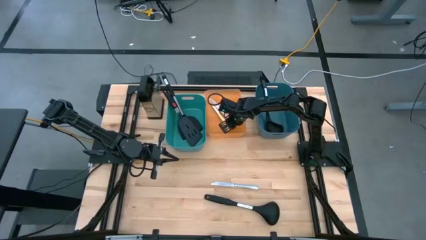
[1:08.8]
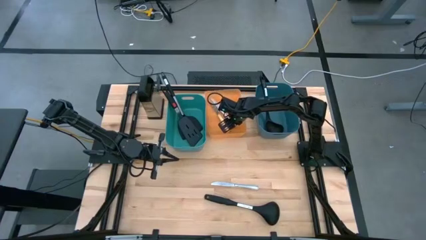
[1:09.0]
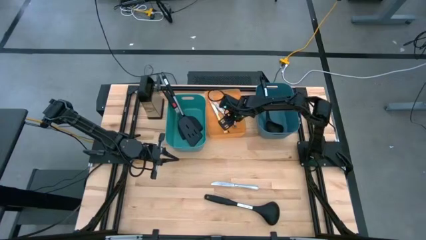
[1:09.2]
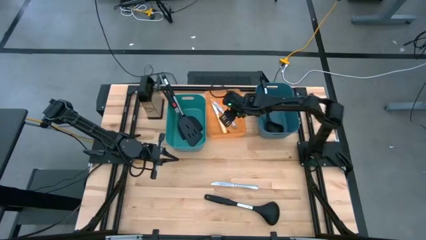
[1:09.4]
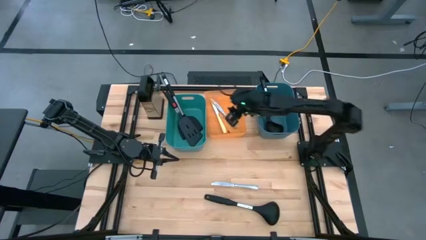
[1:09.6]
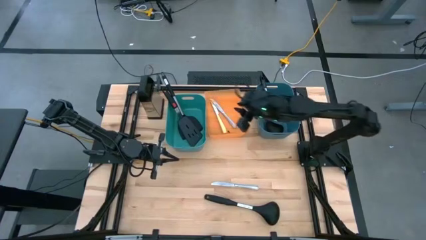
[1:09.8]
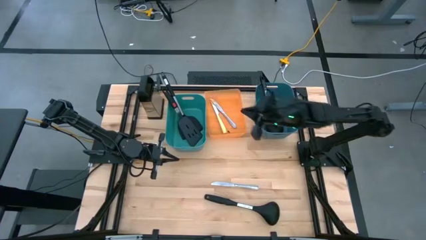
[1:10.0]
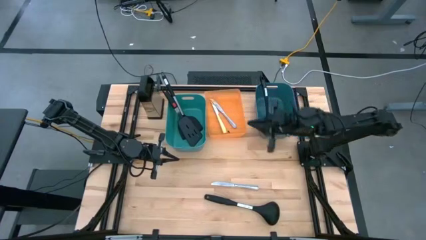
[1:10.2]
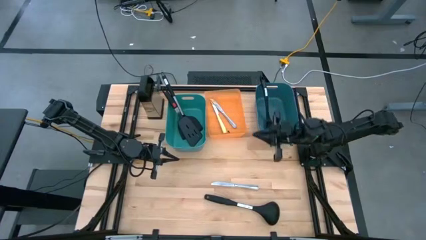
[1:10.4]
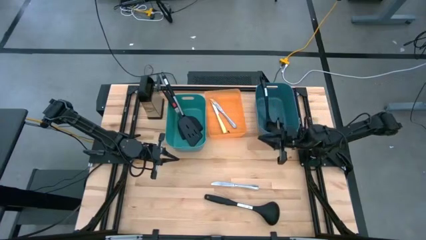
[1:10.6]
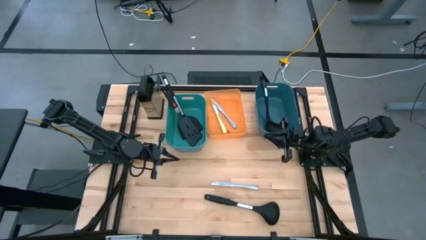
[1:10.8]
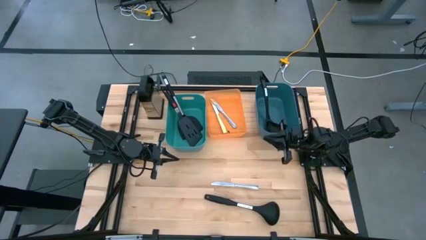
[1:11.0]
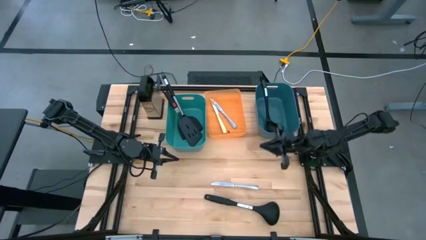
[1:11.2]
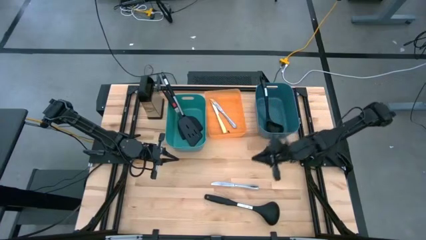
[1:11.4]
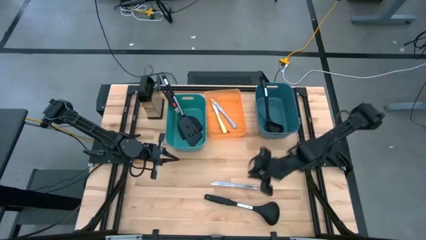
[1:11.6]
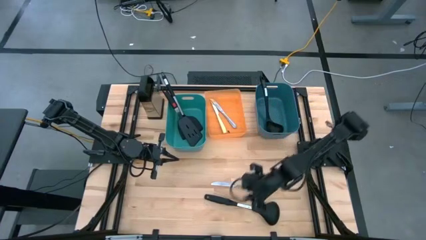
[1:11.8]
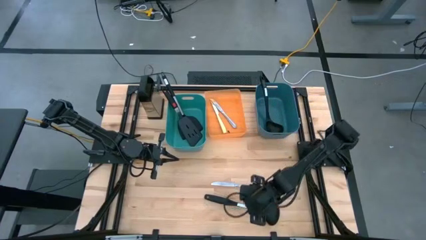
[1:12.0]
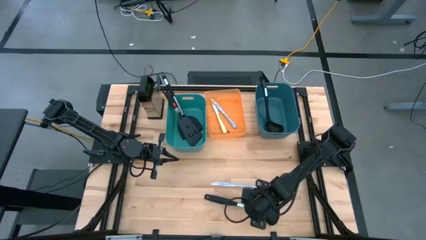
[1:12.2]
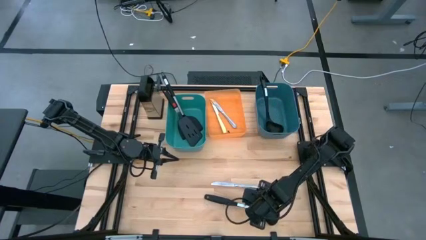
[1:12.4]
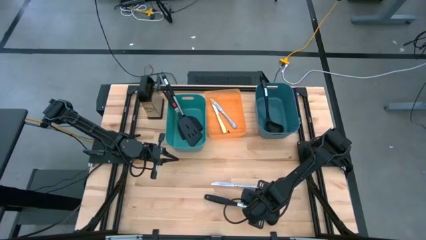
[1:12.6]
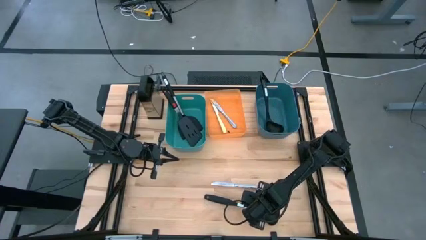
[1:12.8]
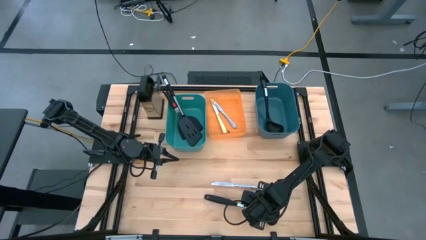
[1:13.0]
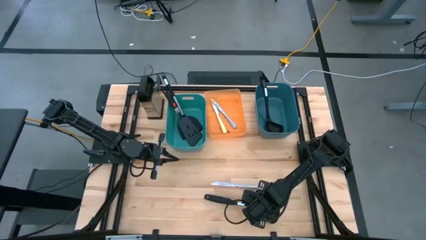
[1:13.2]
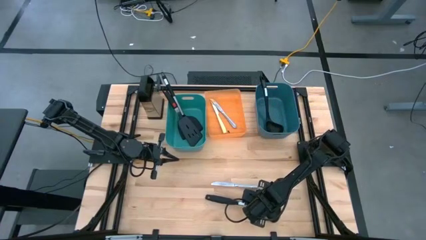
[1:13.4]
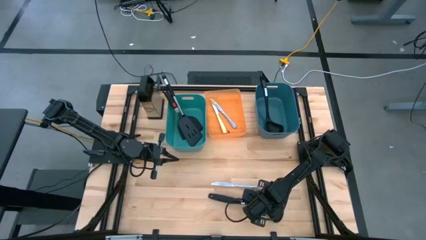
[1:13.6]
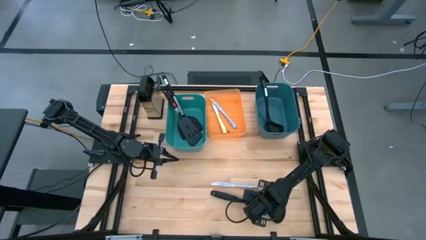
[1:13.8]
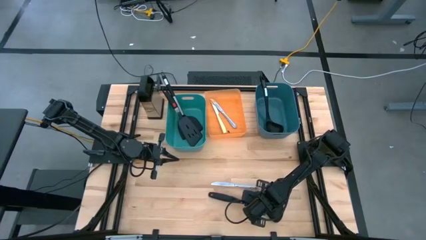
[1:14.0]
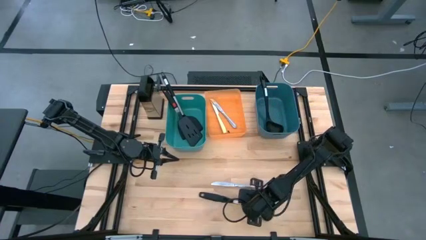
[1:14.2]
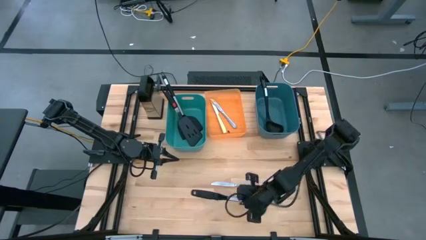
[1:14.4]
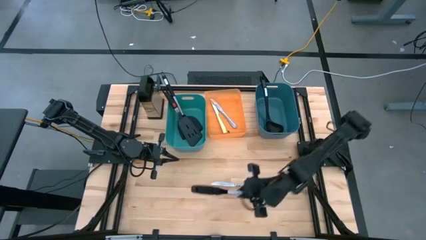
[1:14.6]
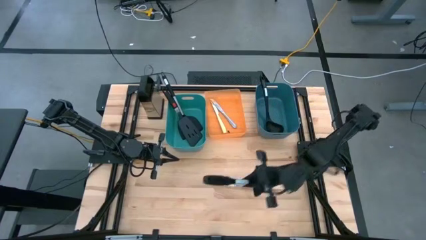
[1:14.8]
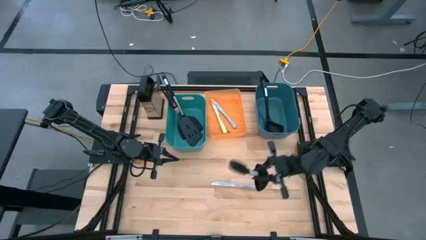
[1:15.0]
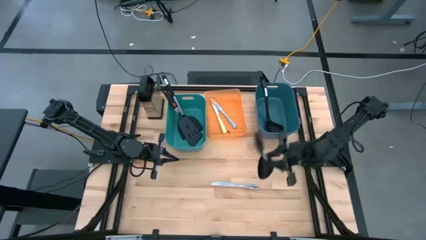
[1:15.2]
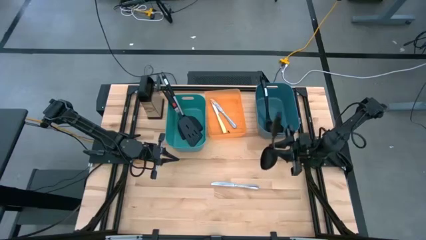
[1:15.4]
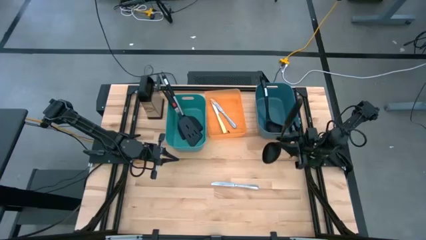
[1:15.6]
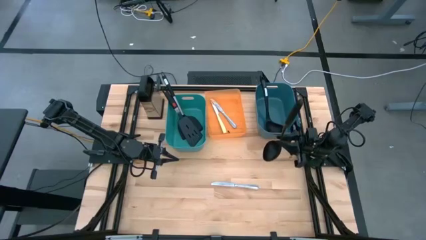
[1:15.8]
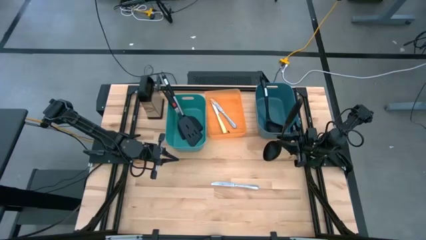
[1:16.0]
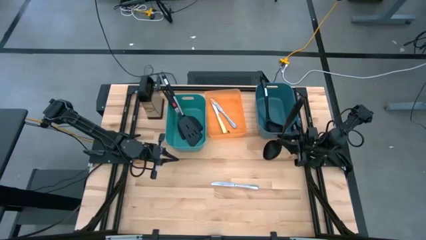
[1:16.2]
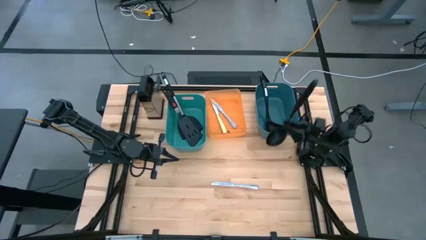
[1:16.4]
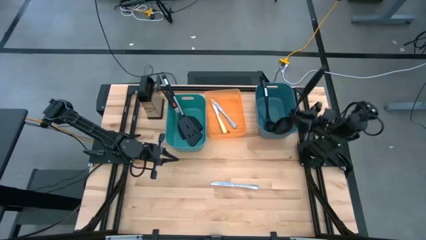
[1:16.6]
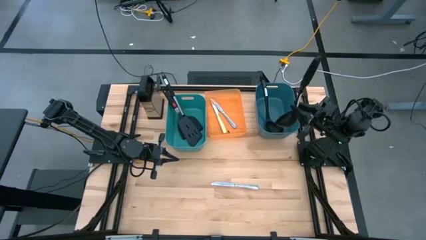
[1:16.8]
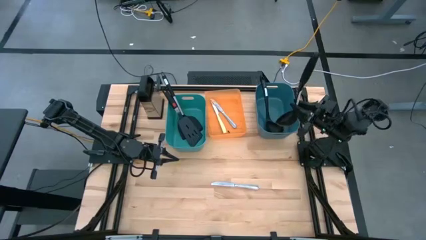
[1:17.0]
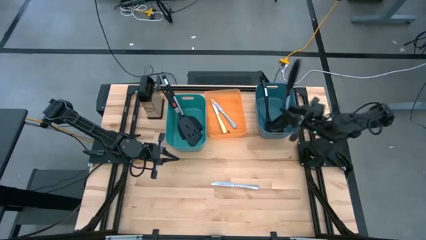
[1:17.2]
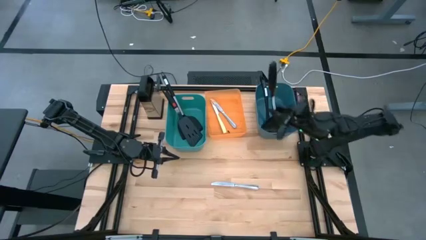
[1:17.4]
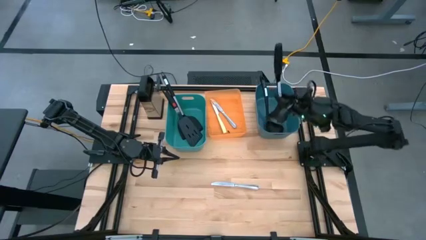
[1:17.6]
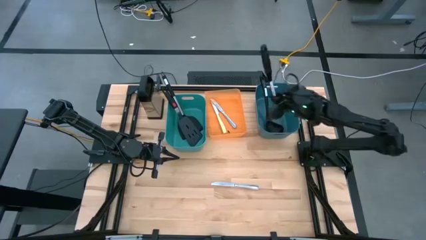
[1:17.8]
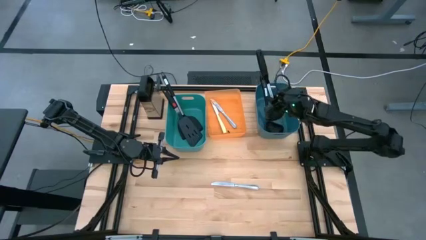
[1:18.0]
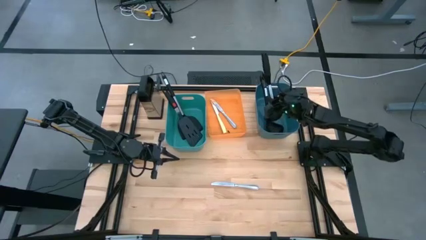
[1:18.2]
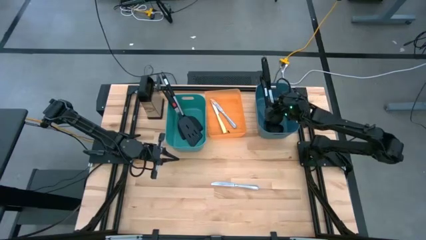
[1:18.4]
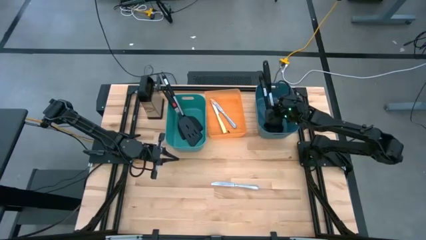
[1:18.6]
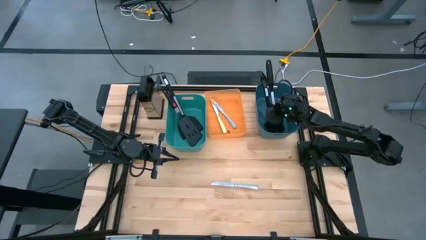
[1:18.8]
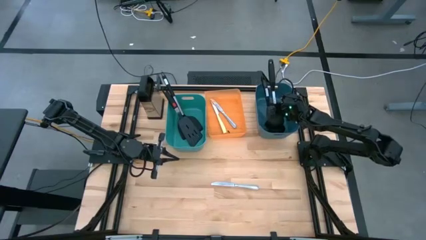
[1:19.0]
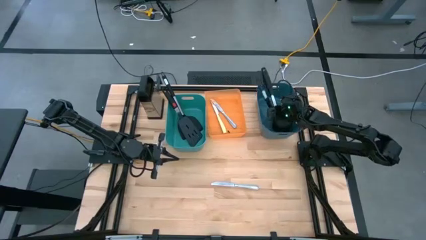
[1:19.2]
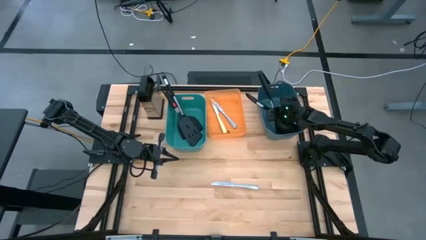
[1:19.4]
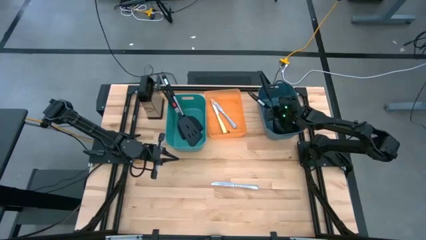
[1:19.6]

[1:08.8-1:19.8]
Task: Pick & Place Kitchen Items
Put the black spoon into the blue bin

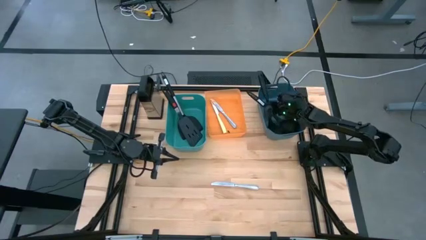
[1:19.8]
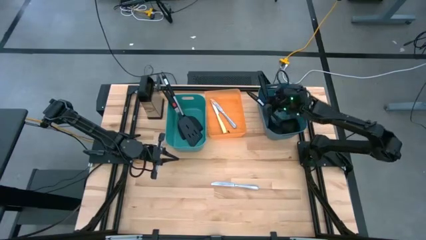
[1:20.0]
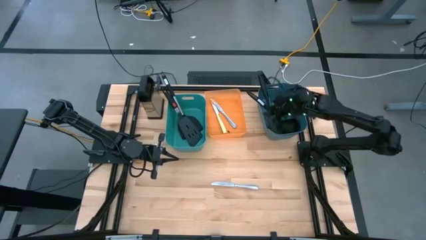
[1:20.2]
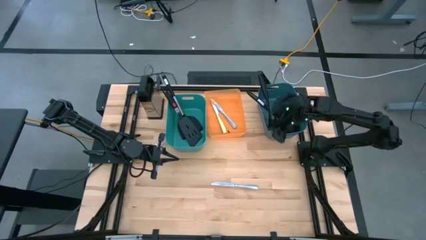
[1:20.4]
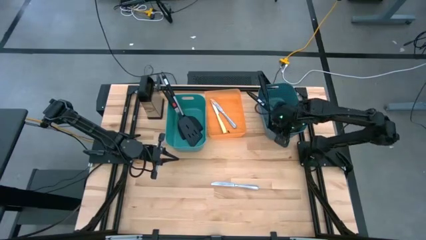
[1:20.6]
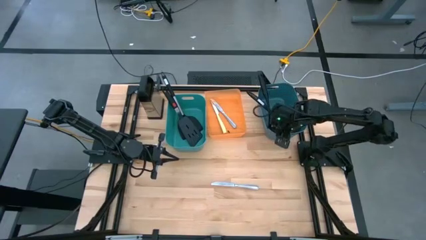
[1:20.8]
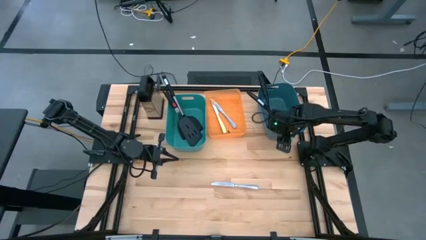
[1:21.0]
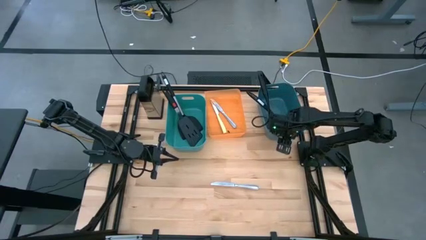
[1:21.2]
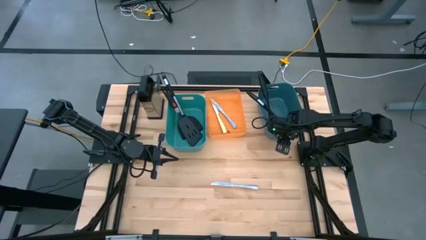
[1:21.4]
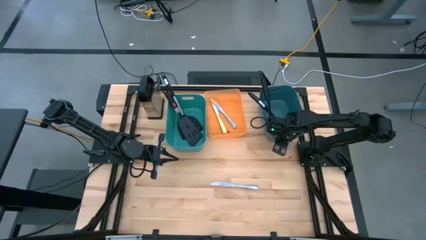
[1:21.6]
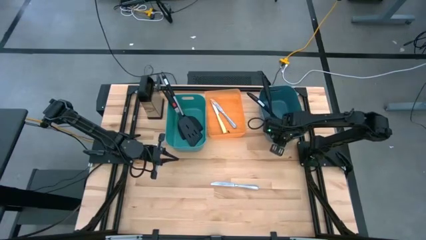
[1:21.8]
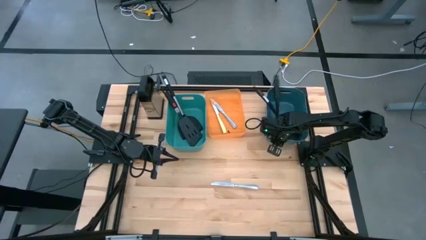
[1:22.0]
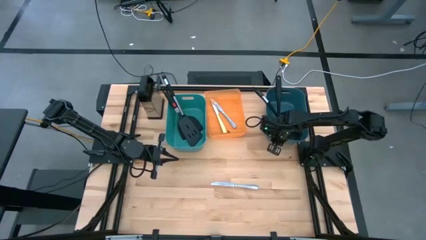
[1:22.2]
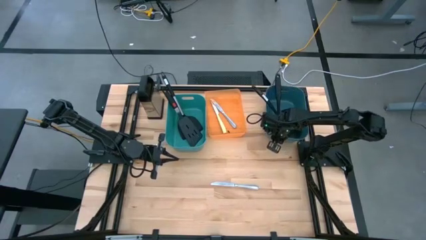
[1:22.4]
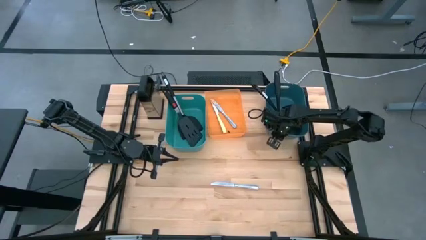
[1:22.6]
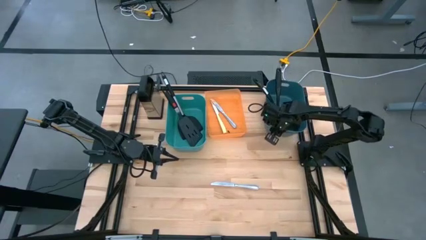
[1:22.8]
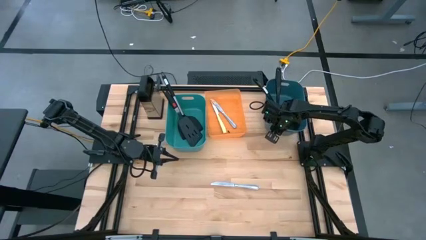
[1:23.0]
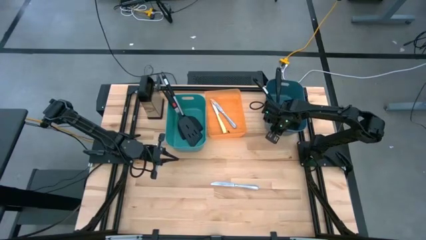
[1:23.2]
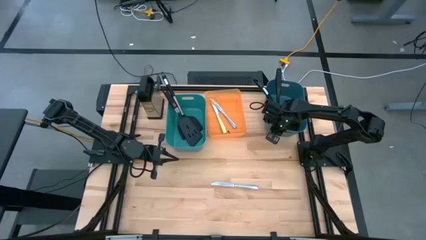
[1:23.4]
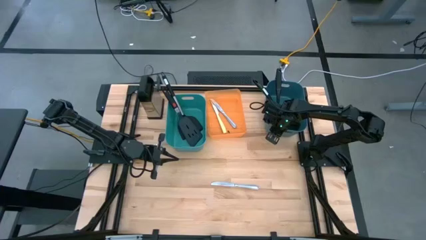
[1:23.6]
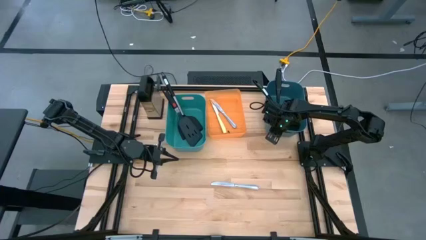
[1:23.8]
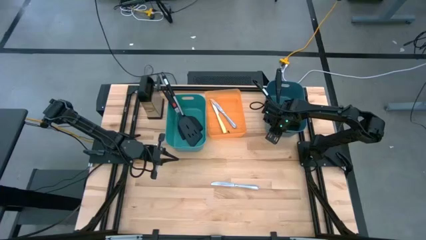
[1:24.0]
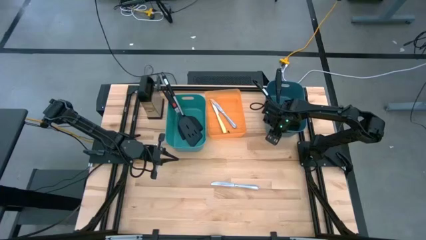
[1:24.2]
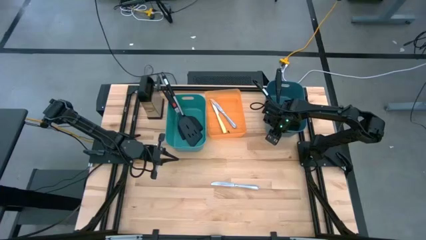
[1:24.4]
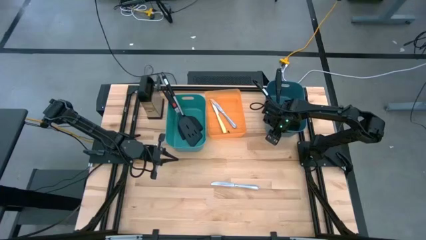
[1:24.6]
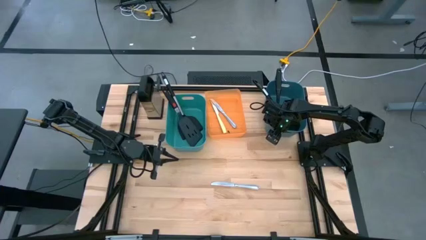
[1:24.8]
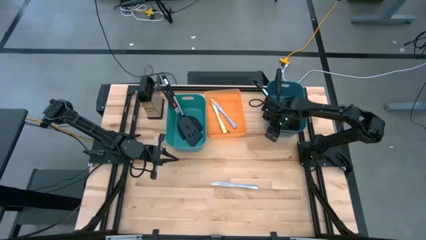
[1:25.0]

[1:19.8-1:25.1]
Adjust the blue bin
